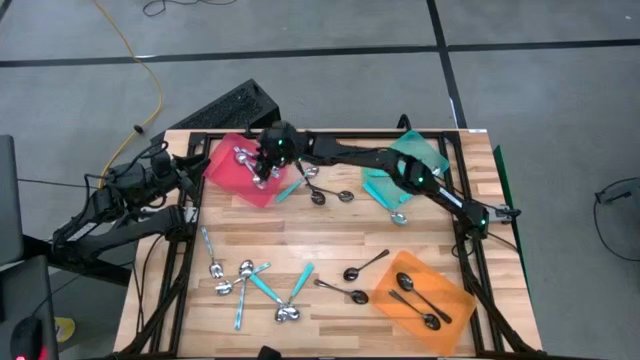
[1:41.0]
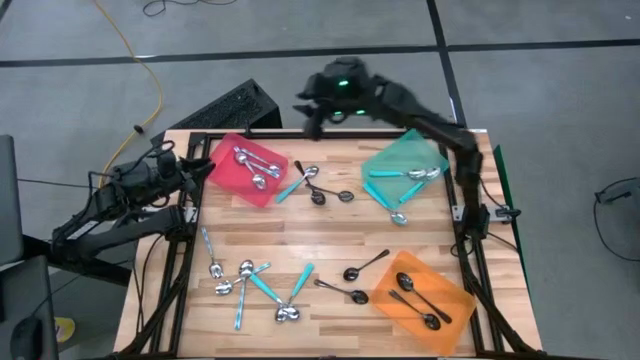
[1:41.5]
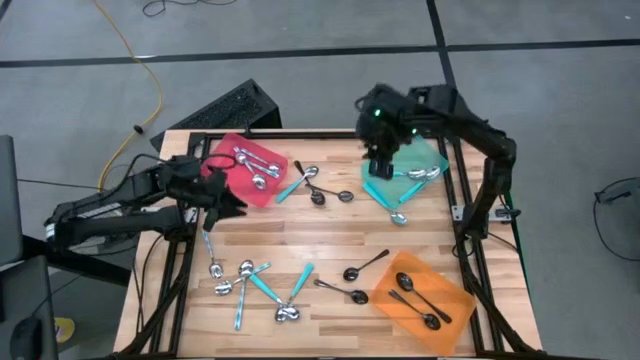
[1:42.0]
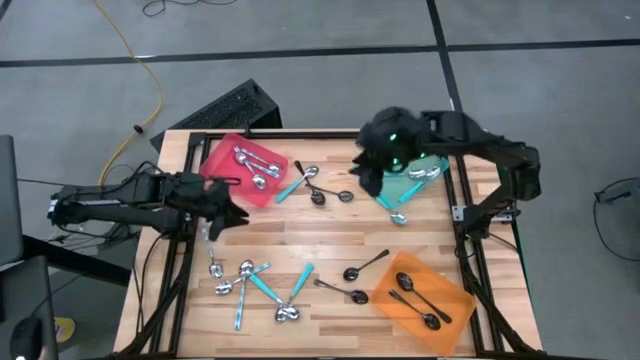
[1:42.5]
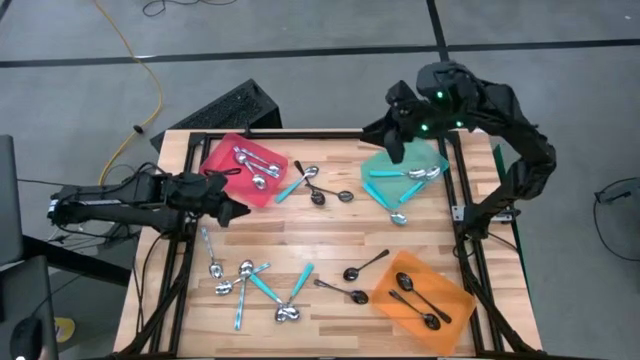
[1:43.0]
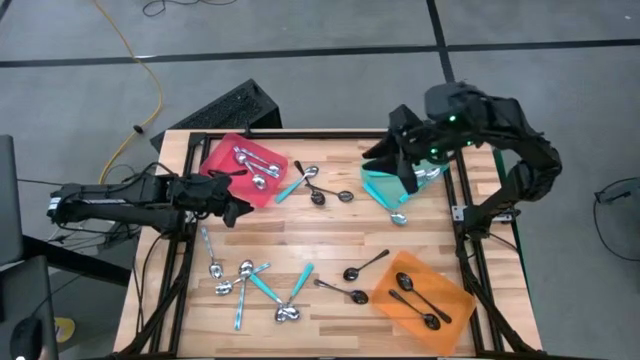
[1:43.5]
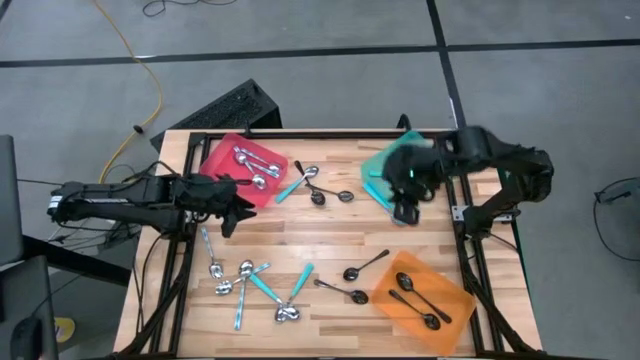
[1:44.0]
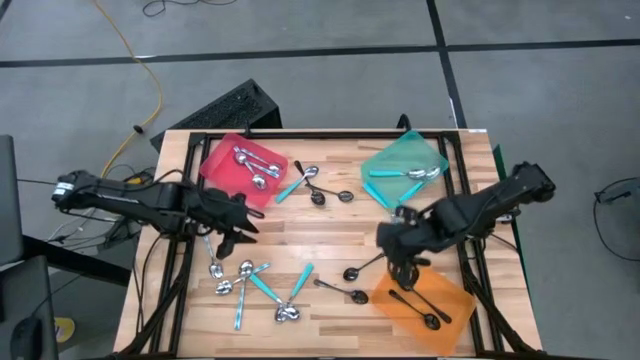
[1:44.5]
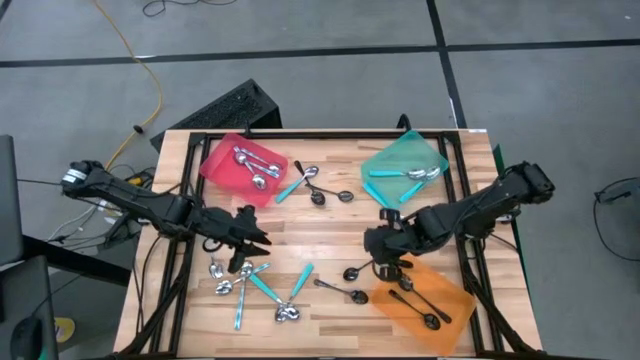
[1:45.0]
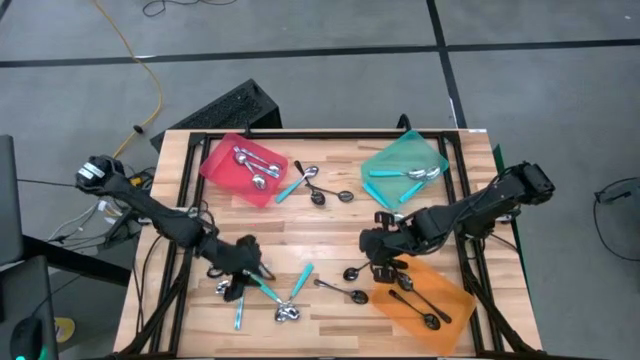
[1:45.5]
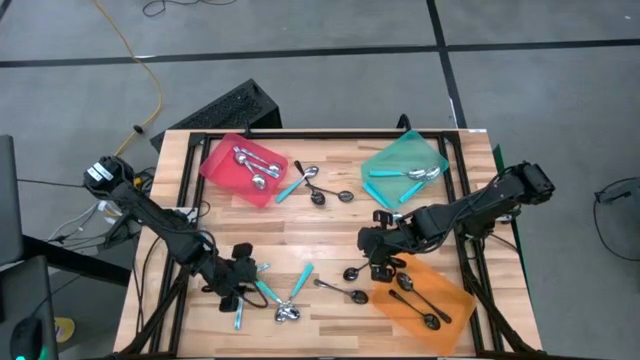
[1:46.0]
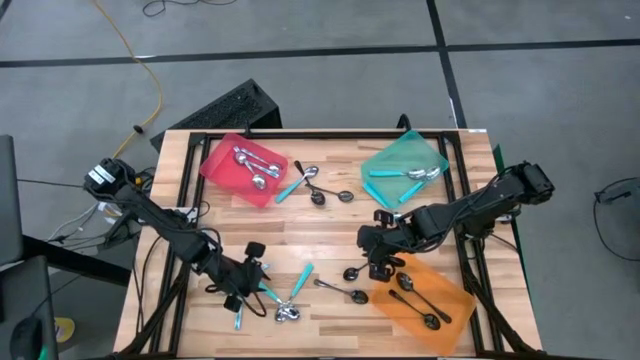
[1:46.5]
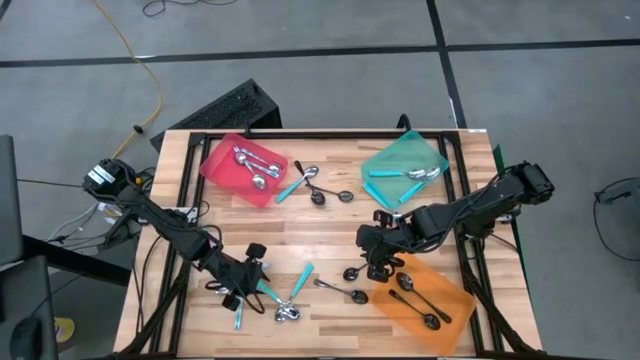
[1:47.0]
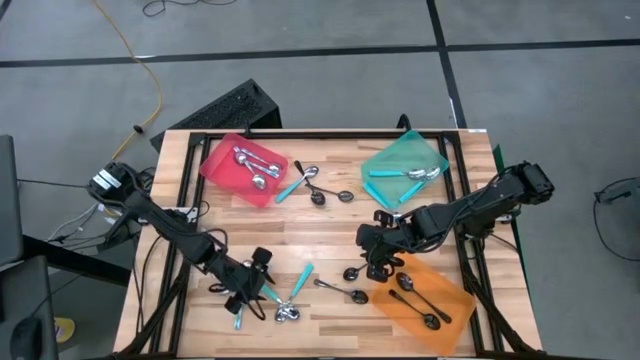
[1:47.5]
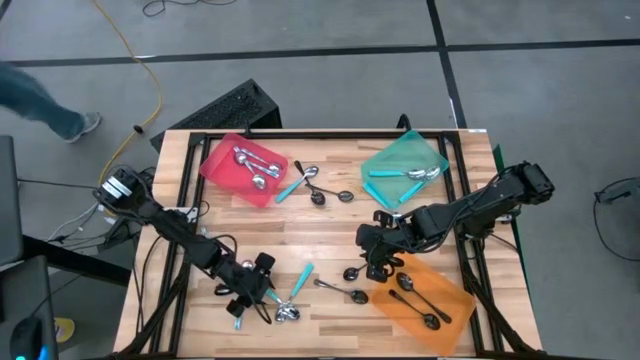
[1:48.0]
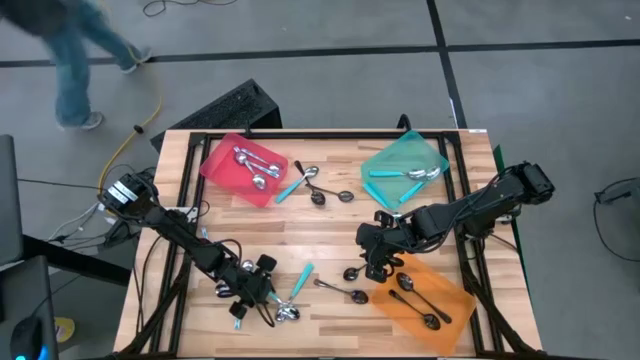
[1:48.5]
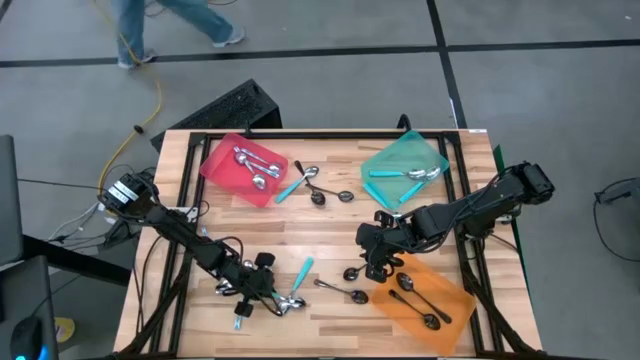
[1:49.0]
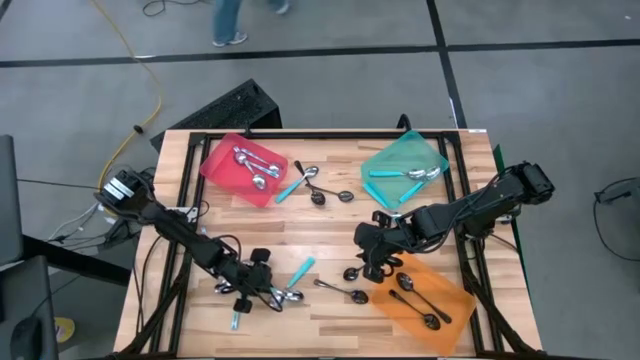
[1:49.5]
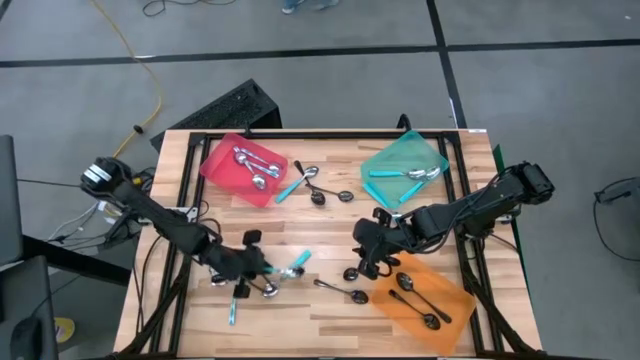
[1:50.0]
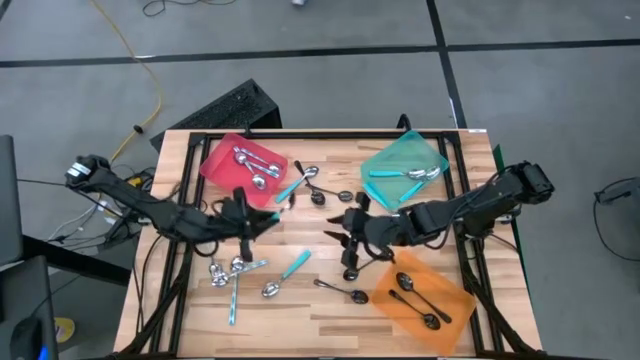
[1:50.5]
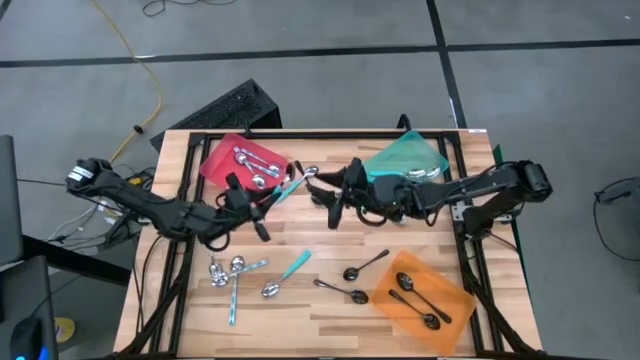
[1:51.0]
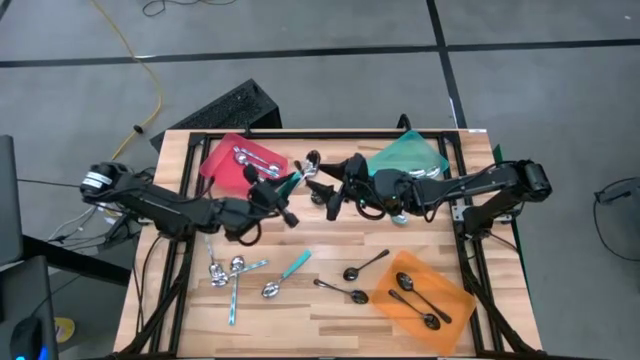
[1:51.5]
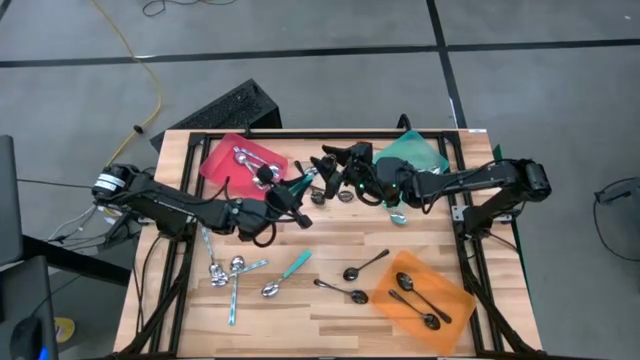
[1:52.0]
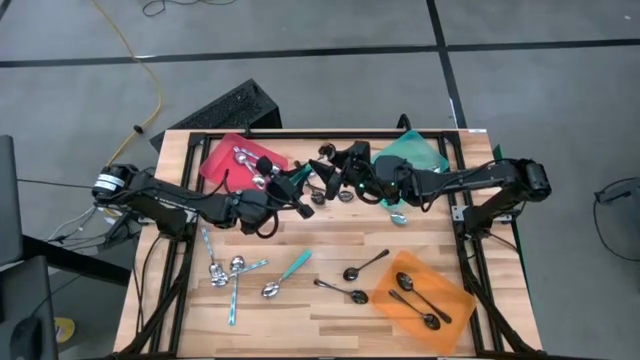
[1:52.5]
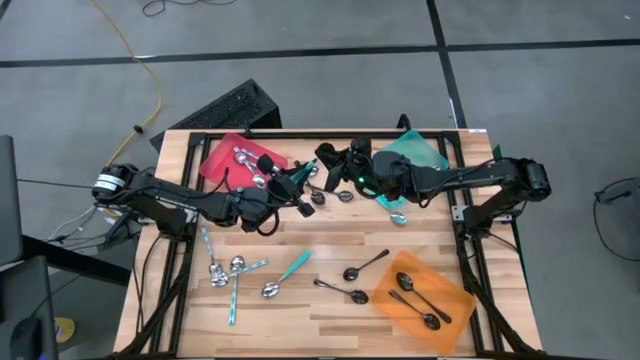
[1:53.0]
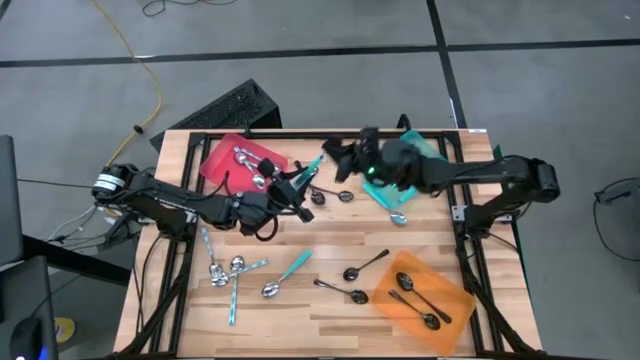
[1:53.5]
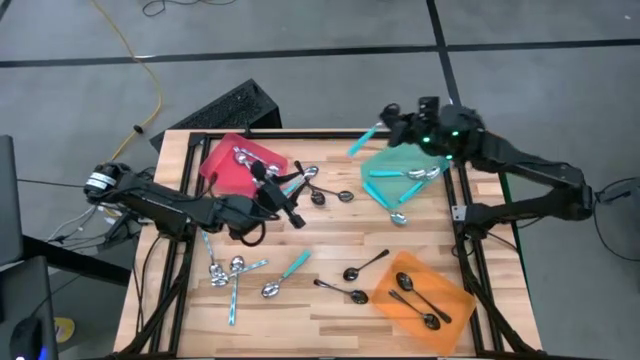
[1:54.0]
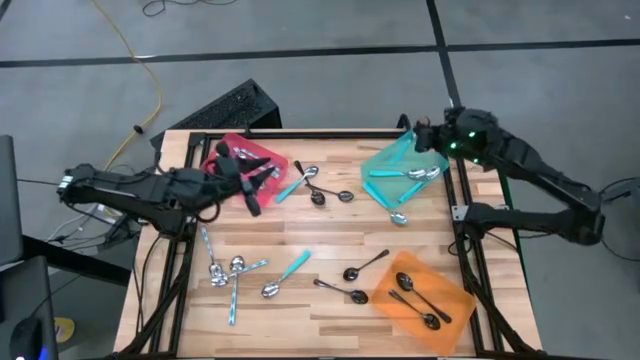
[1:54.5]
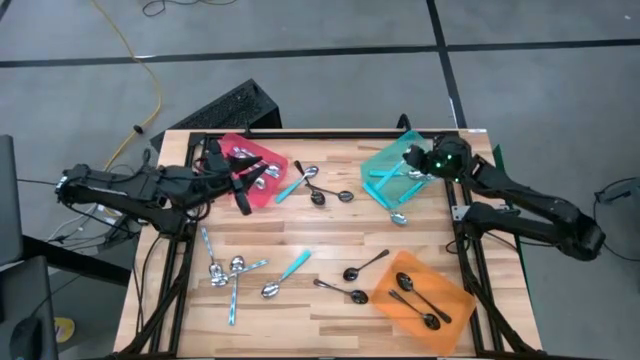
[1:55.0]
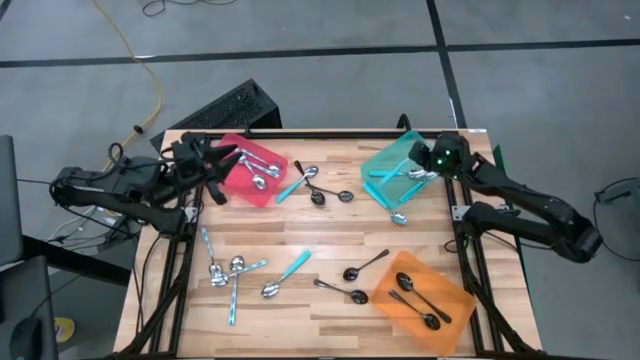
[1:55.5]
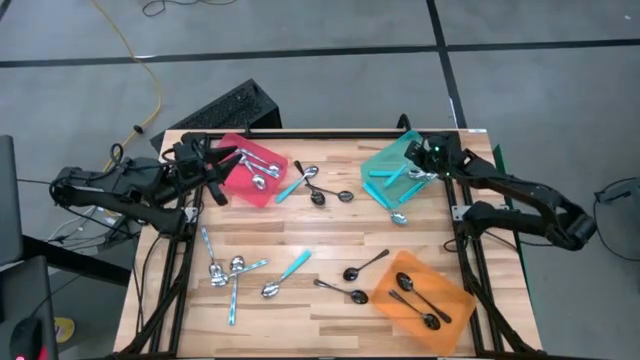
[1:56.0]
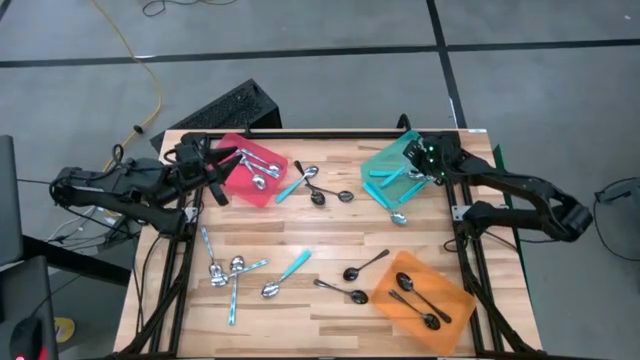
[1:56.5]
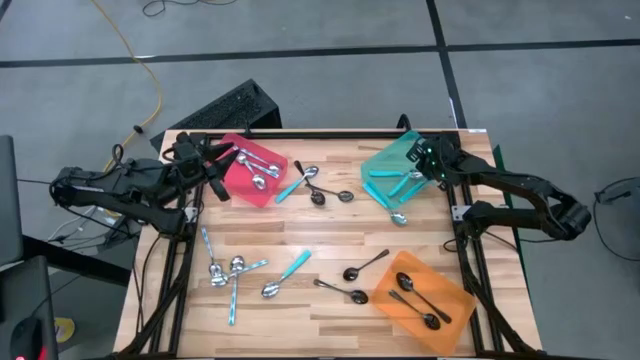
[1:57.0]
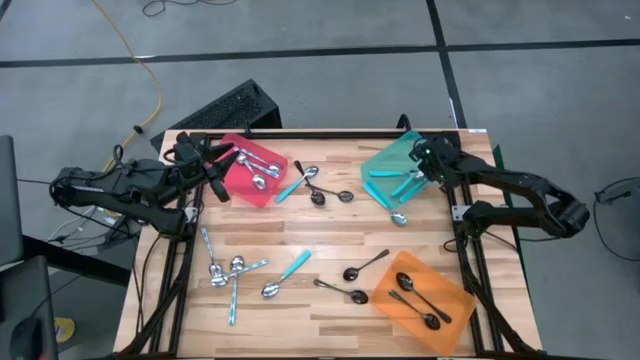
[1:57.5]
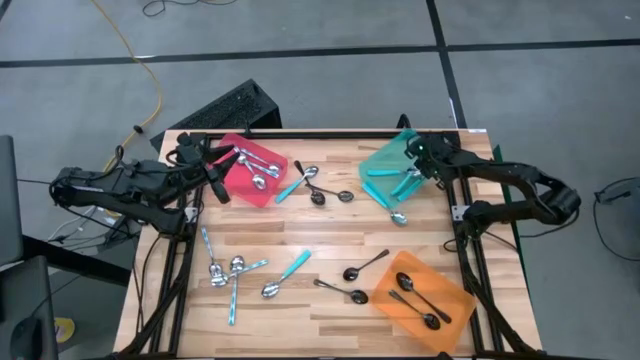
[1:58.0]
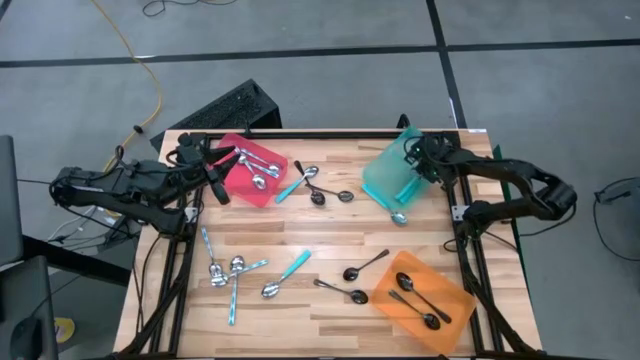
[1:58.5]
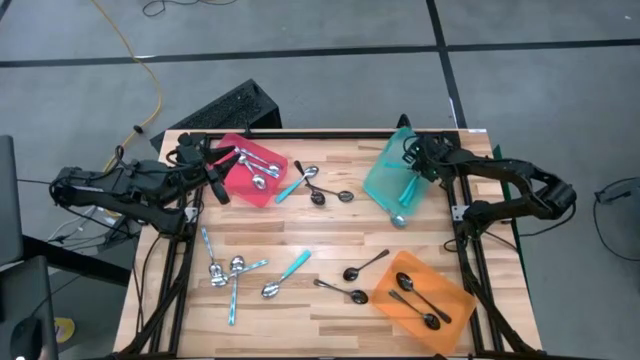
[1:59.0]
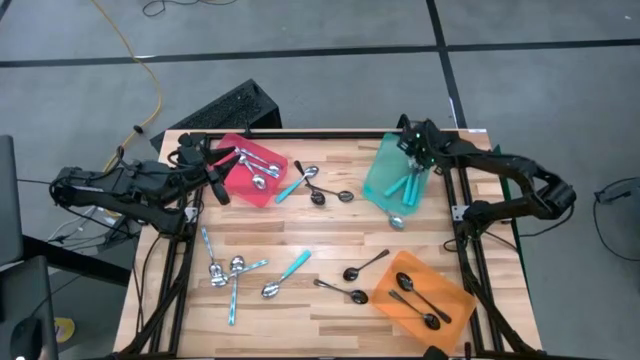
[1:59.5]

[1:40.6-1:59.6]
Task: Sort silverware by color (type)
Put the blue spoon into the blue bin

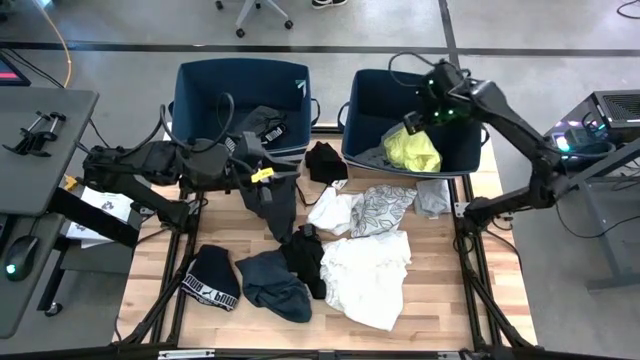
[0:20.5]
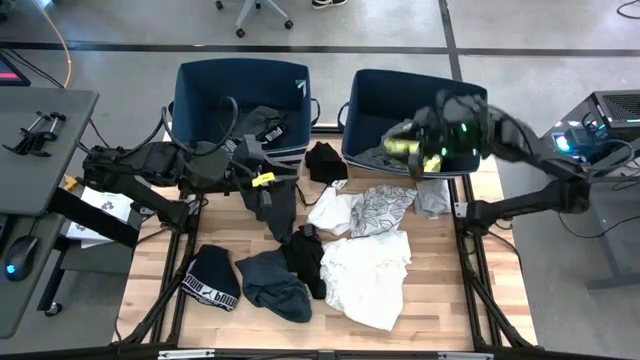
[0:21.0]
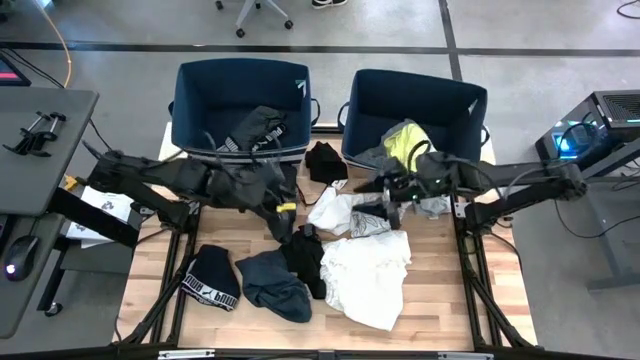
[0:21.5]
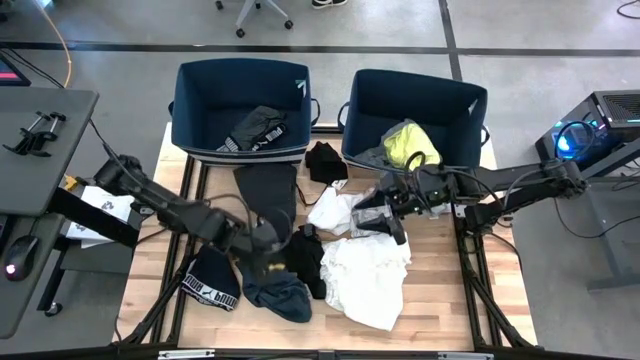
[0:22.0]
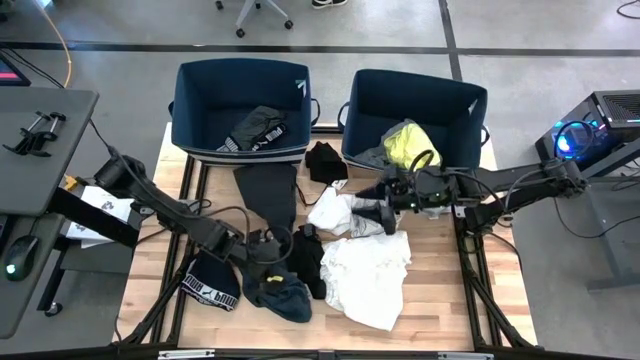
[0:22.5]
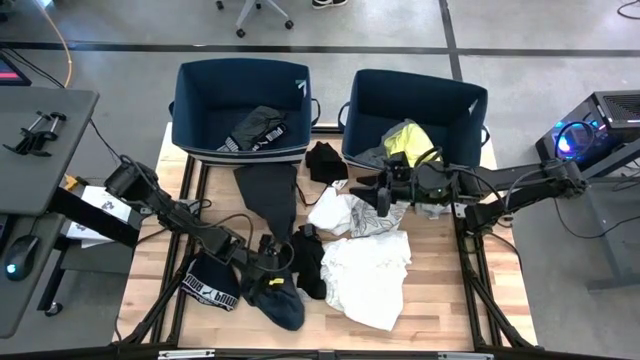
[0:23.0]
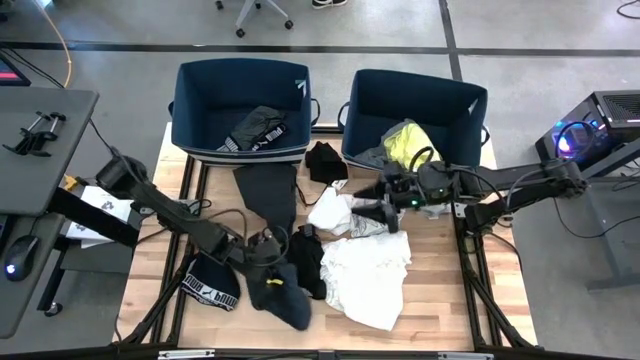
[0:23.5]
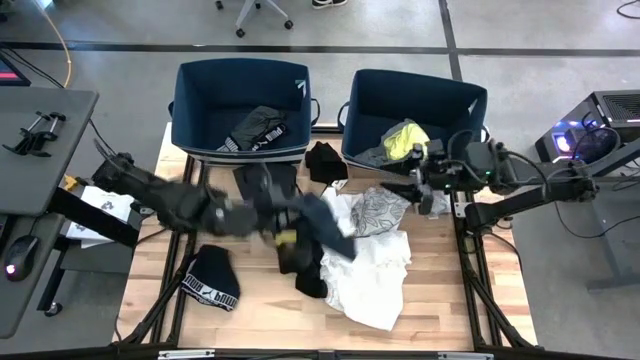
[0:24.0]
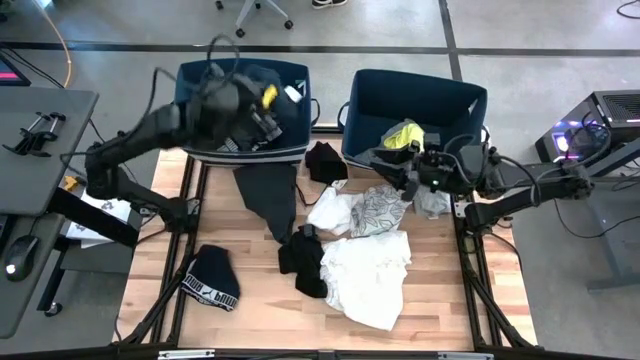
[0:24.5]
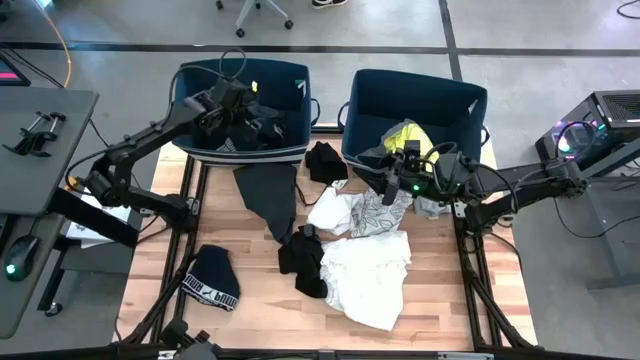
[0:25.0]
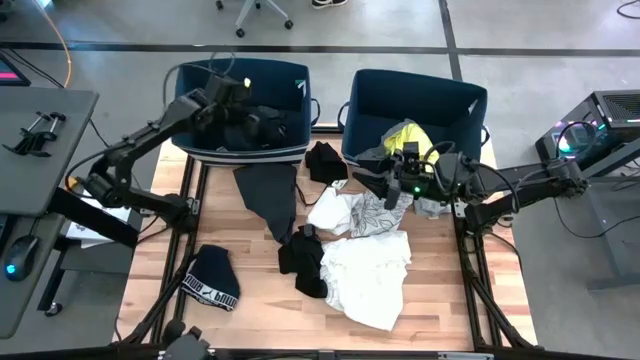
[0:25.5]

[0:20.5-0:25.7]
Task: Sort clothes
Put the blue shorts into the left laundry bin
